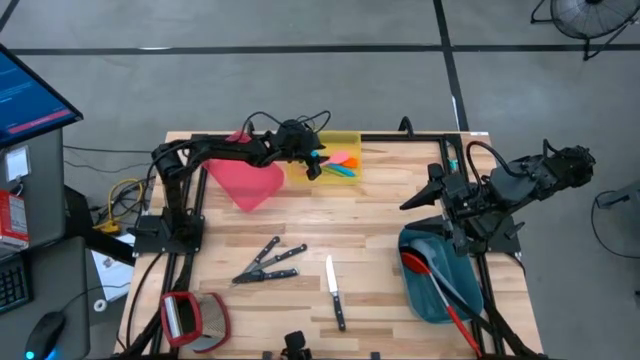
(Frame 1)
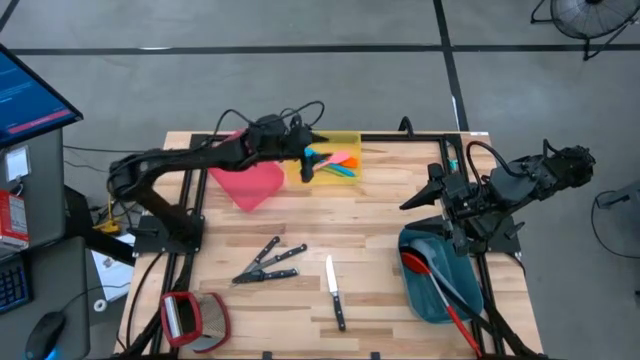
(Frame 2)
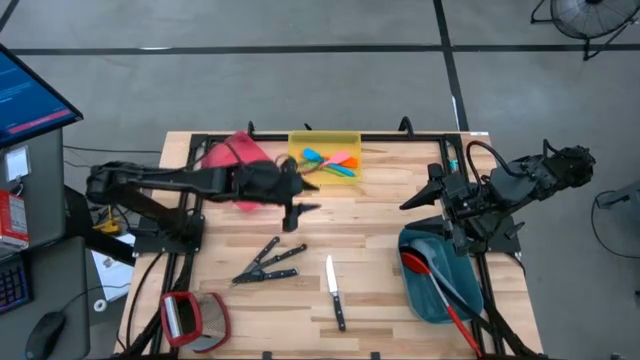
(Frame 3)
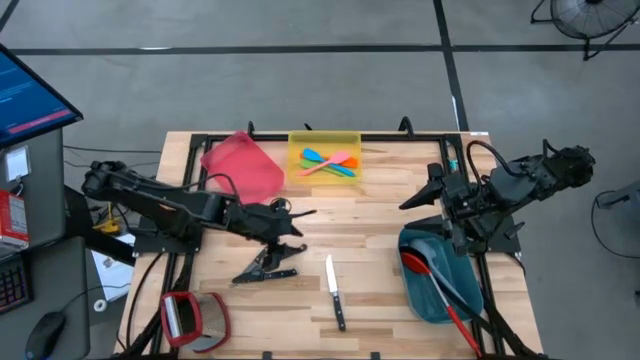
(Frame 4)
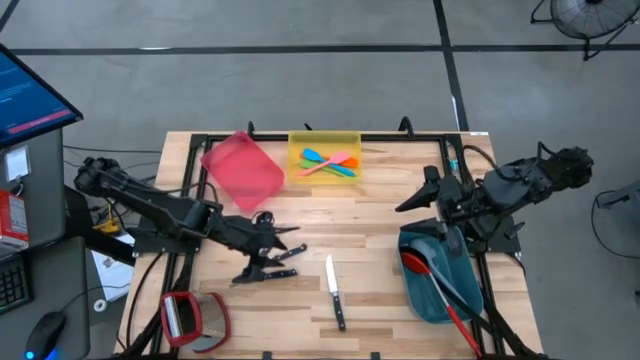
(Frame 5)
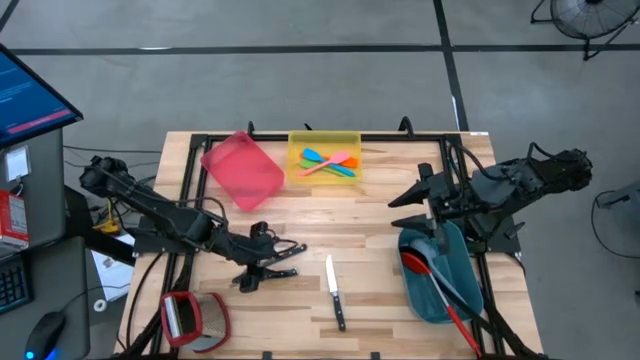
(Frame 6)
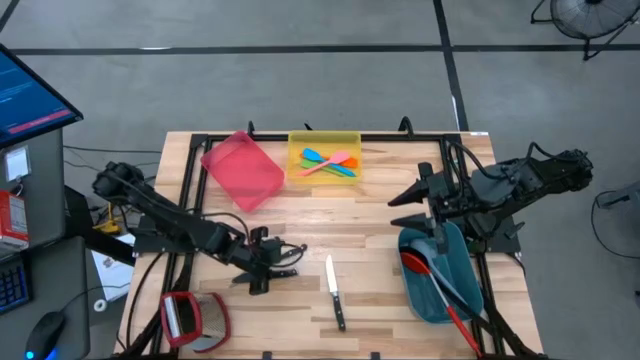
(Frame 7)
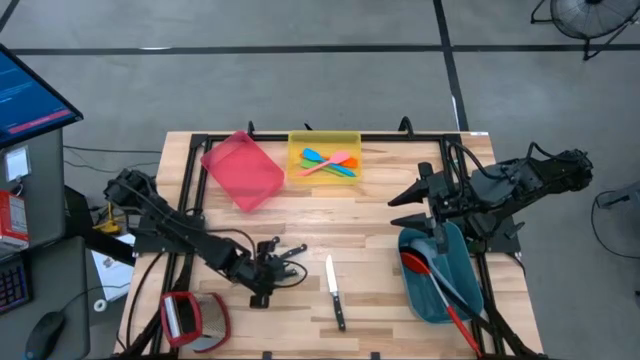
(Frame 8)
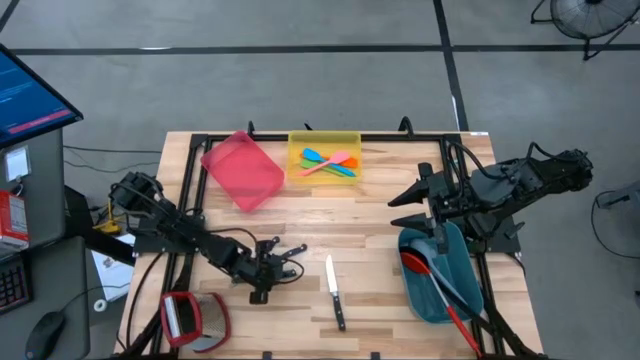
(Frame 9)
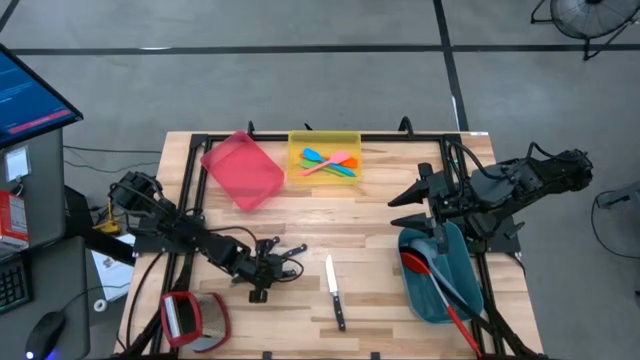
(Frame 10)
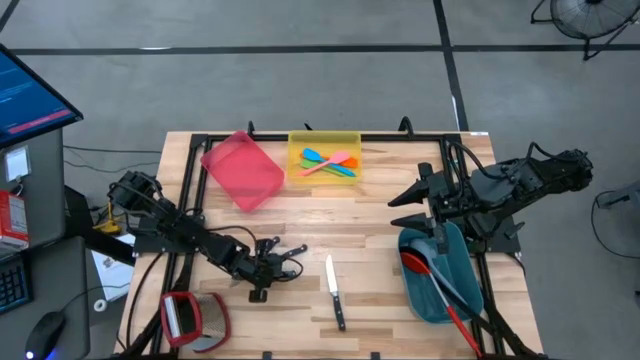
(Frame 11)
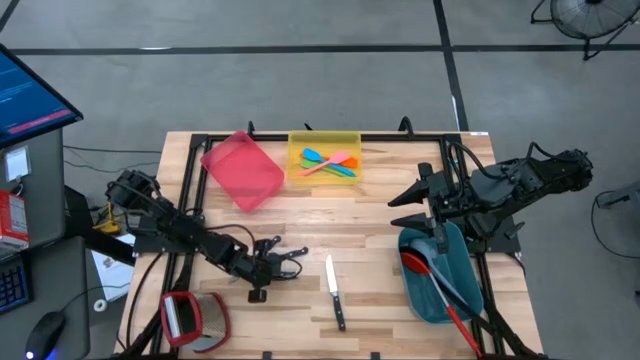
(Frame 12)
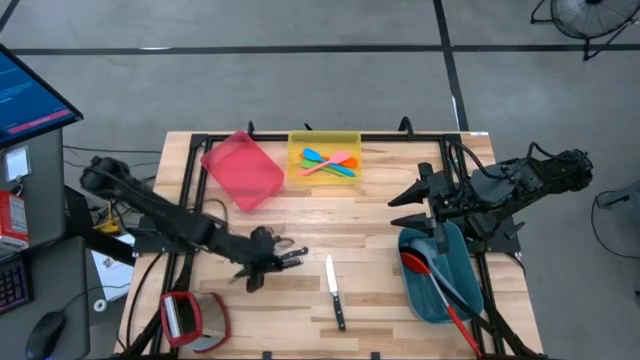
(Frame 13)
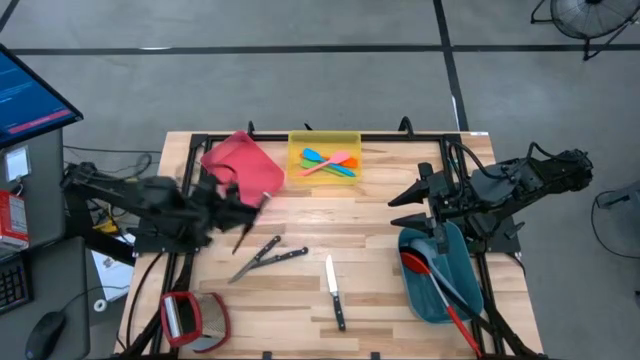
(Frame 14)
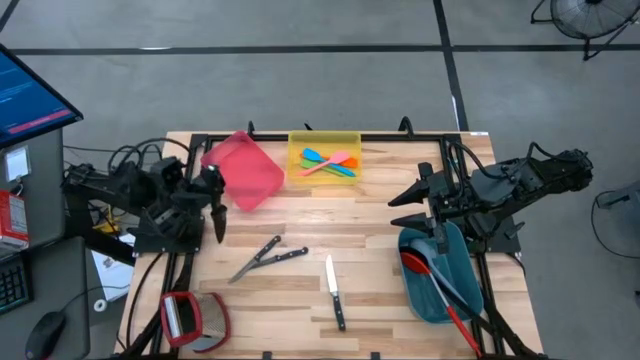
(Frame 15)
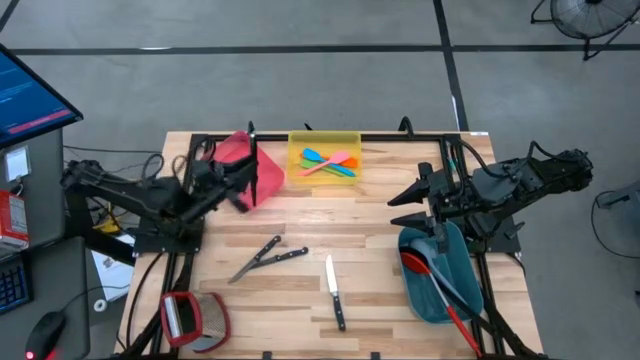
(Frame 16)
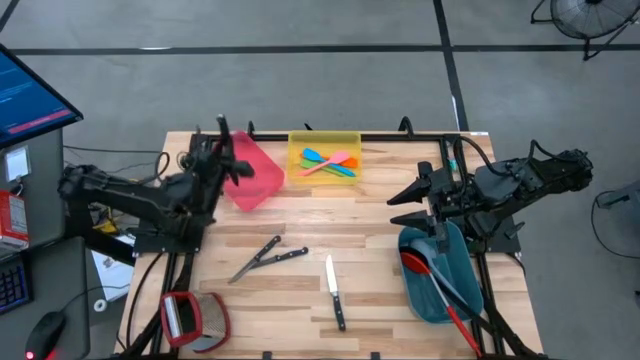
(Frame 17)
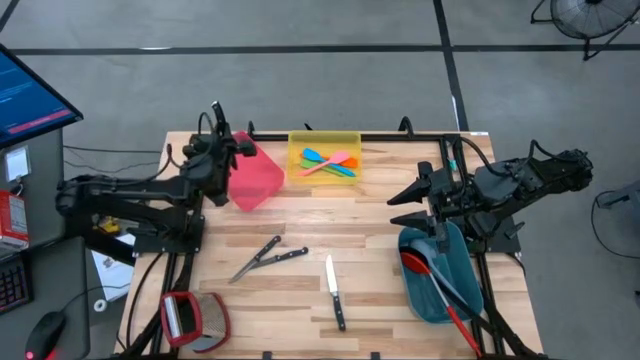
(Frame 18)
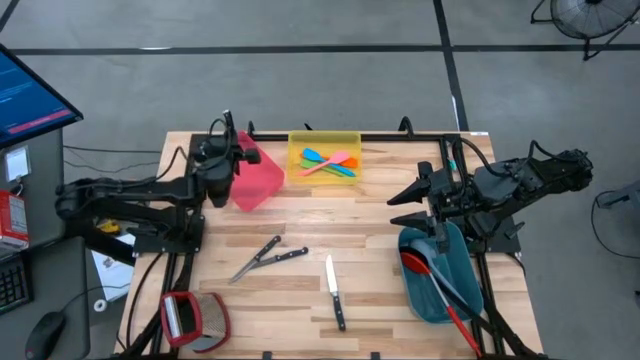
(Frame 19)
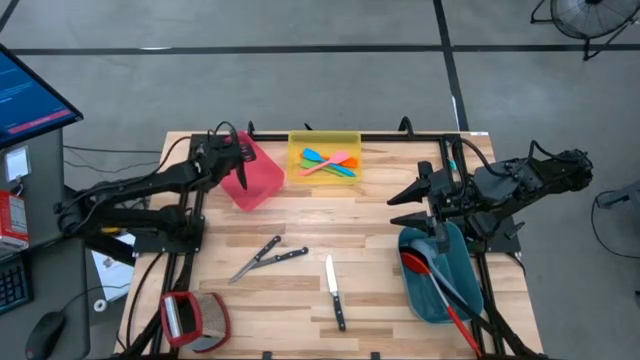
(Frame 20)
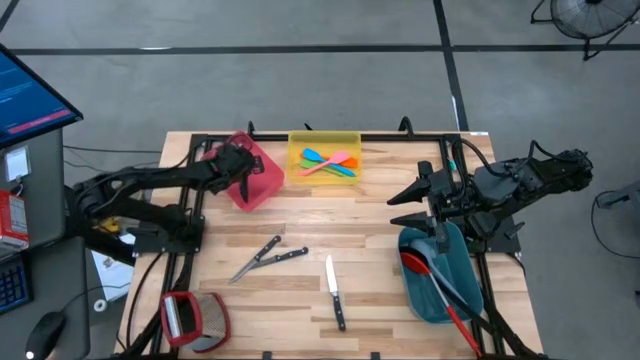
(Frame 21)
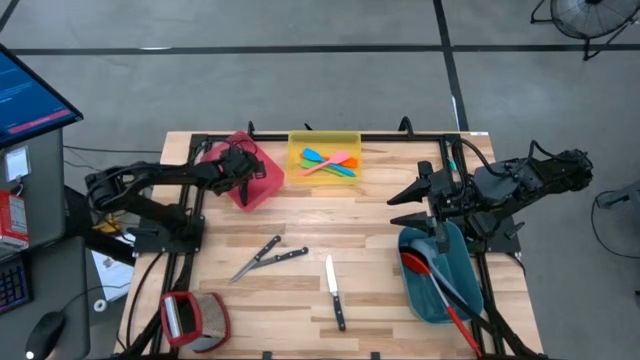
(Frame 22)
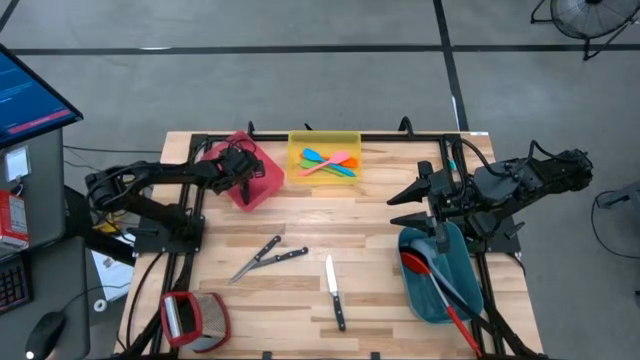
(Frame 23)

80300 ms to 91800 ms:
Task: Pick & Place Kitchen Items
Put the black knife into the pink bin

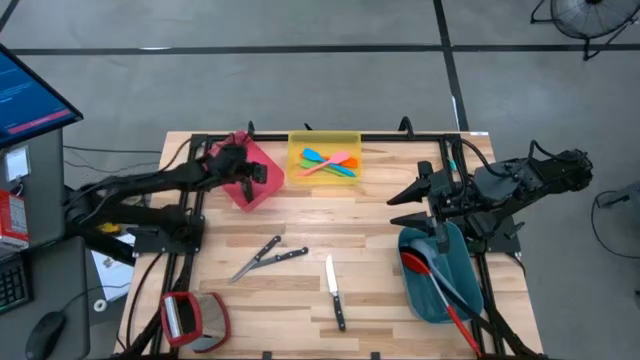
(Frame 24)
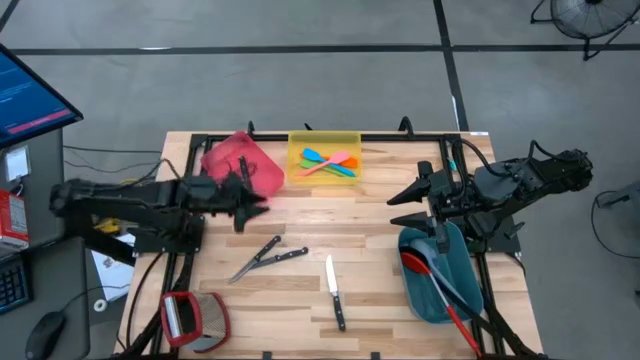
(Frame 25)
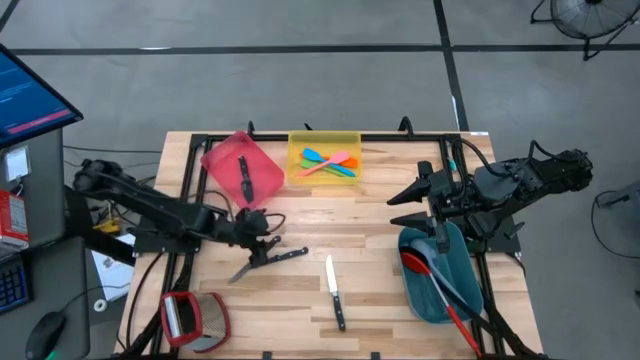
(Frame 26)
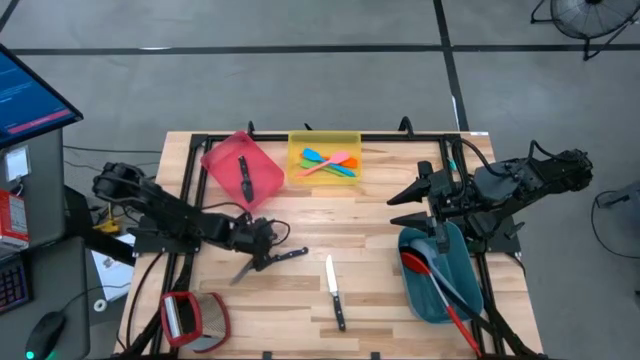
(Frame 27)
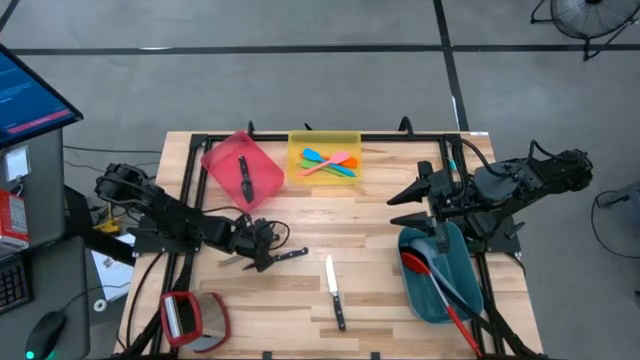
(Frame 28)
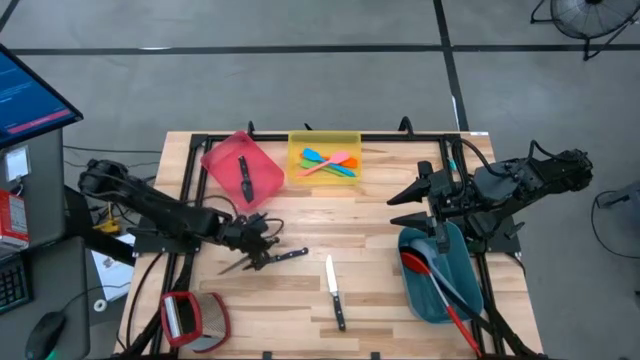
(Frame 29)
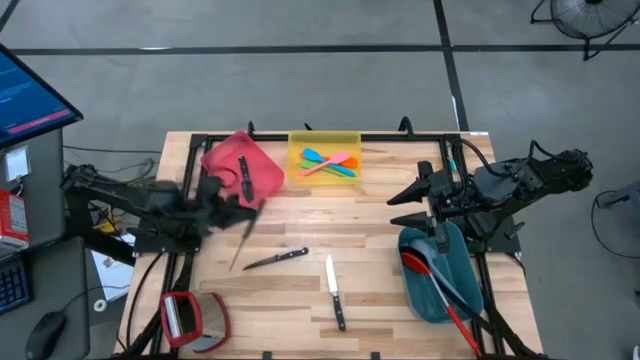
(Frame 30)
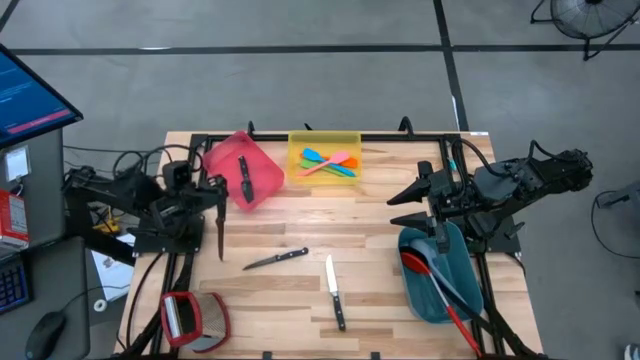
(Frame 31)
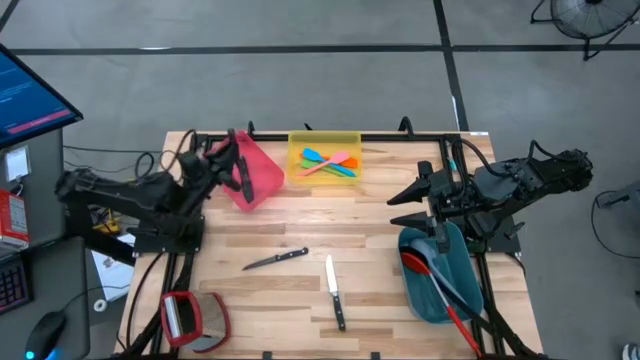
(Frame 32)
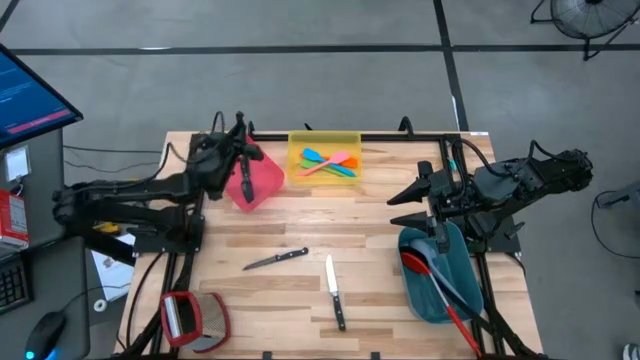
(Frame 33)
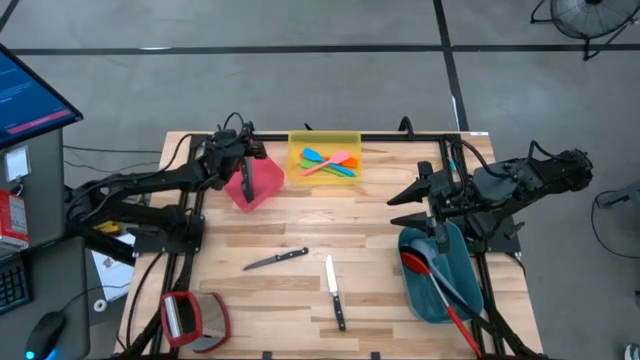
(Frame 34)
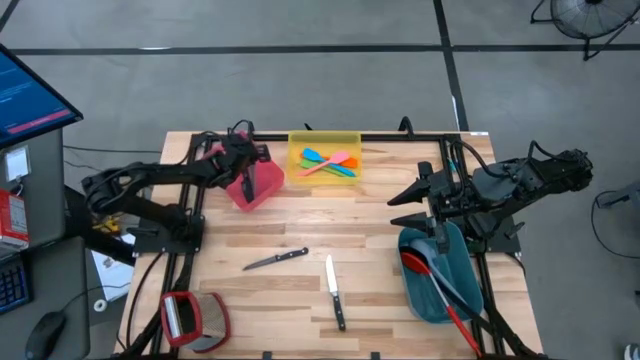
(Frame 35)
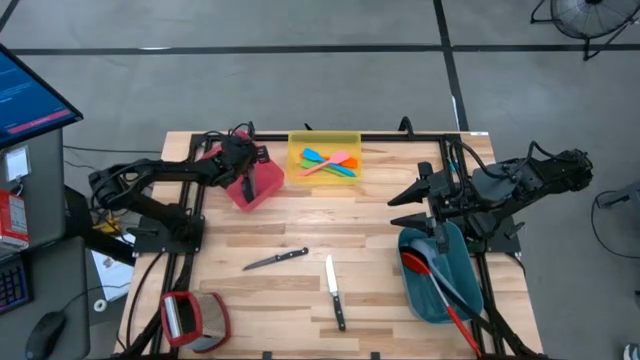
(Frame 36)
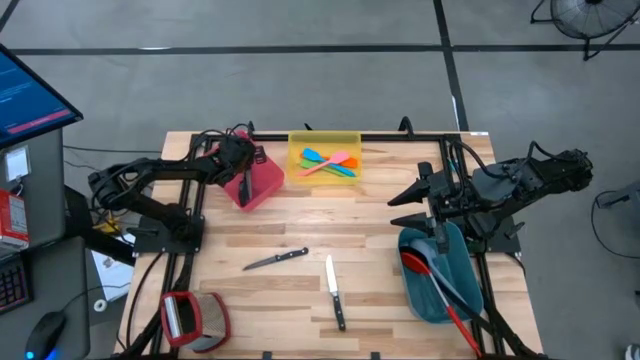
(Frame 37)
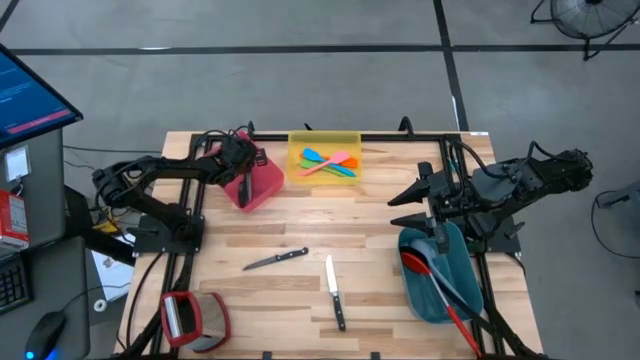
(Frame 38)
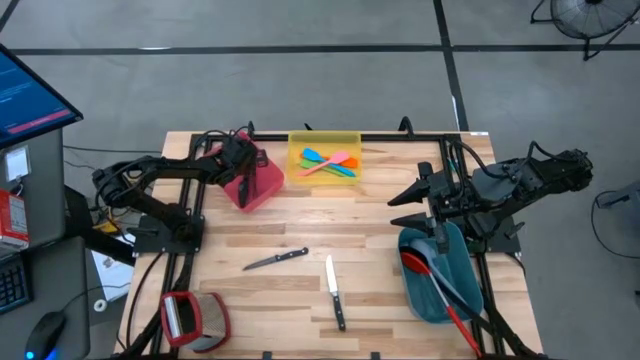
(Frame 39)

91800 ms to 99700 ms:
Put the top left silver knife into the pink bin

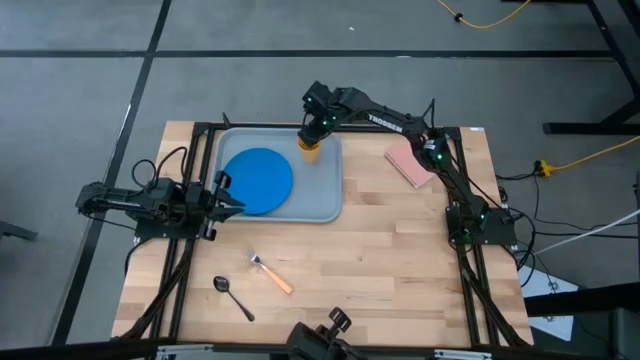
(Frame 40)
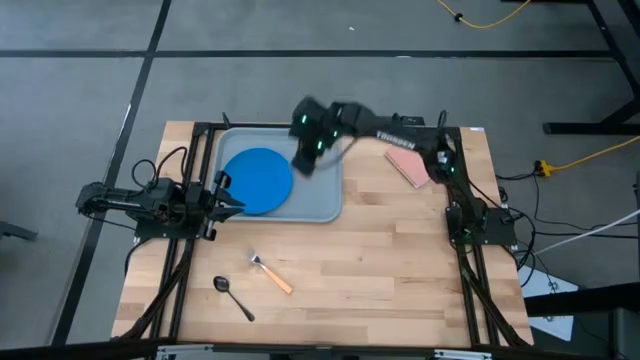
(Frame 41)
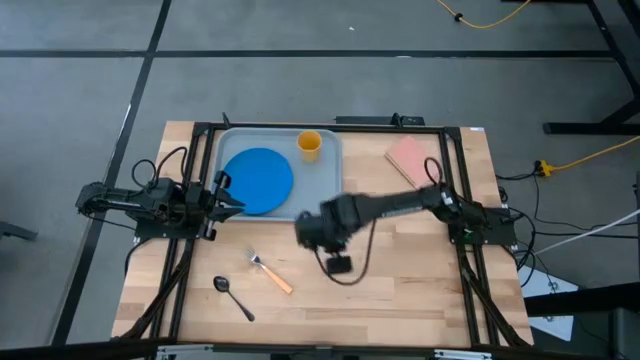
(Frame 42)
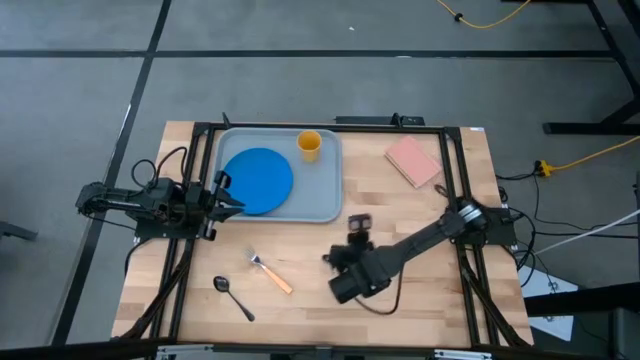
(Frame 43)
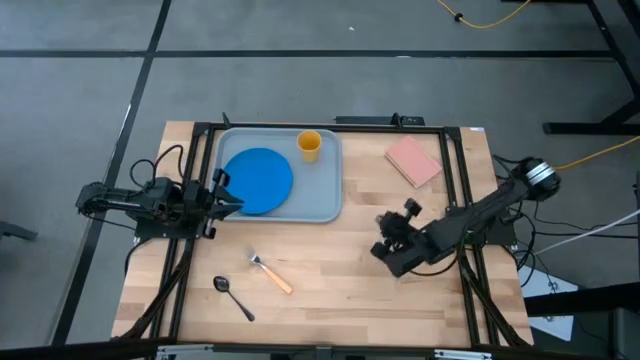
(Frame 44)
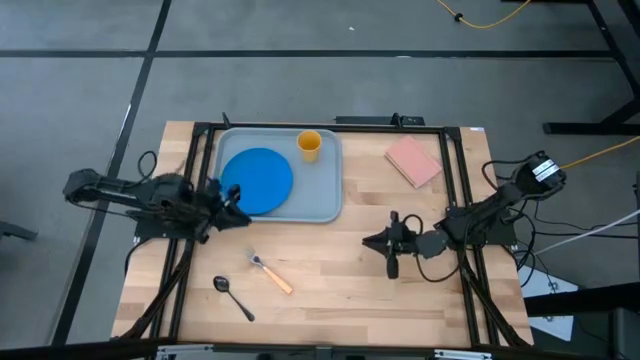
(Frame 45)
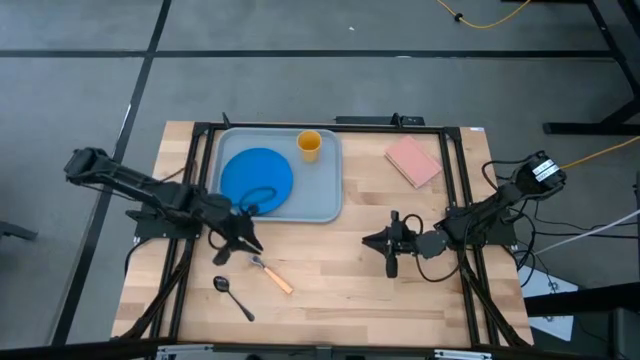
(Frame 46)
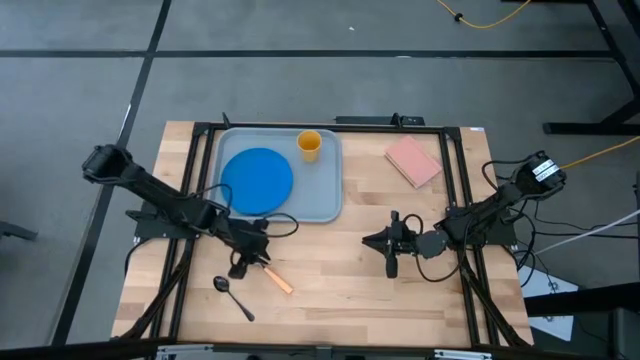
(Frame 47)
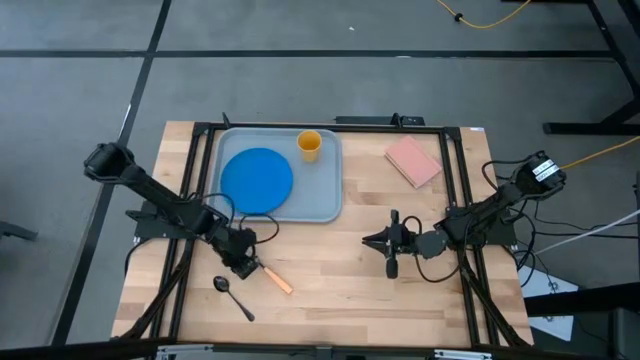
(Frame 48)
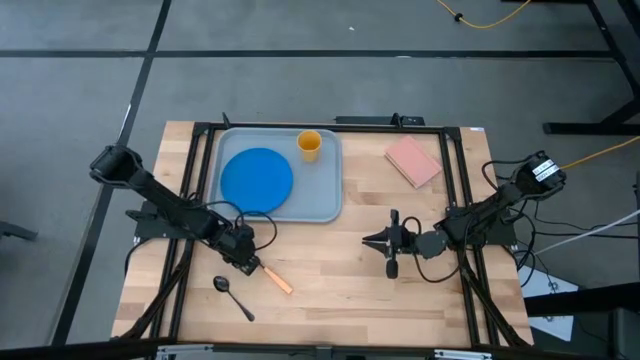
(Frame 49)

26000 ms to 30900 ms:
Task: Pick and place plate/cup/fork/spoon on tray
Adjust the light orange fork
